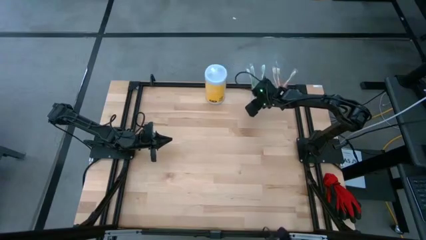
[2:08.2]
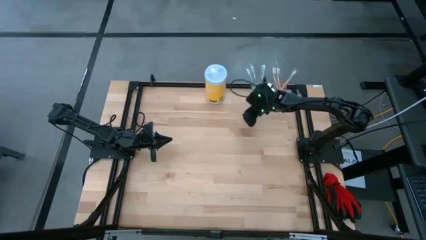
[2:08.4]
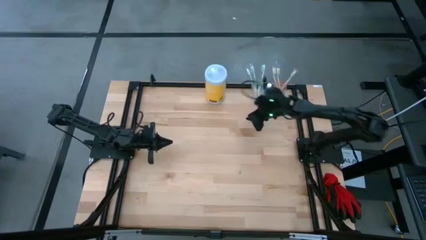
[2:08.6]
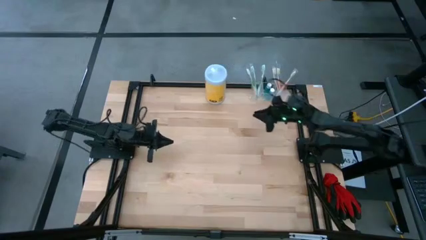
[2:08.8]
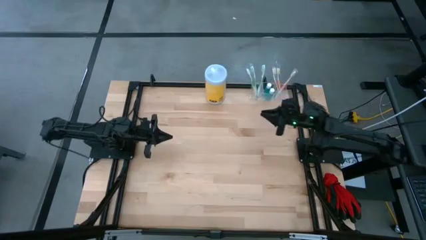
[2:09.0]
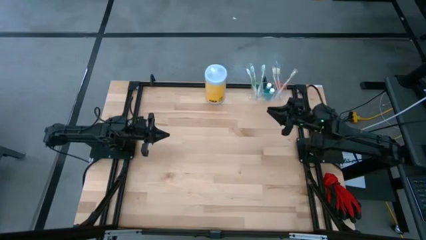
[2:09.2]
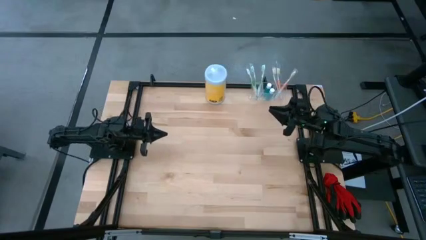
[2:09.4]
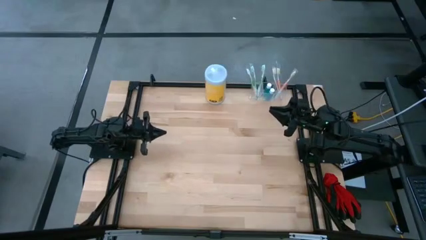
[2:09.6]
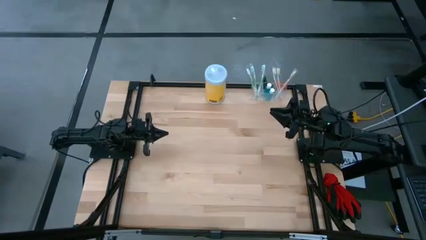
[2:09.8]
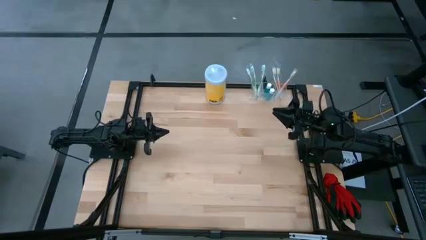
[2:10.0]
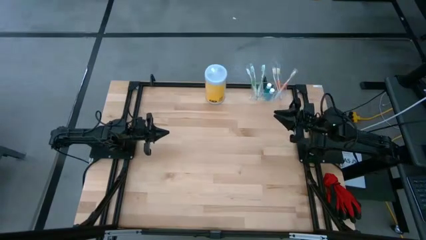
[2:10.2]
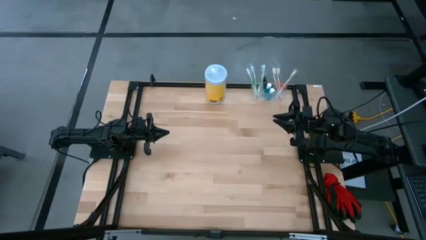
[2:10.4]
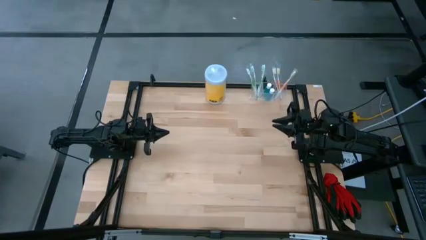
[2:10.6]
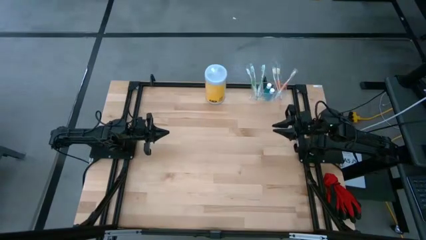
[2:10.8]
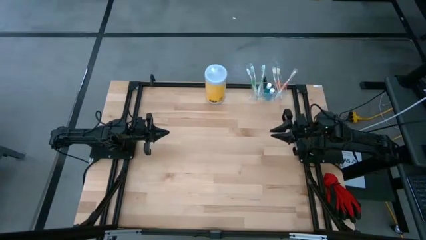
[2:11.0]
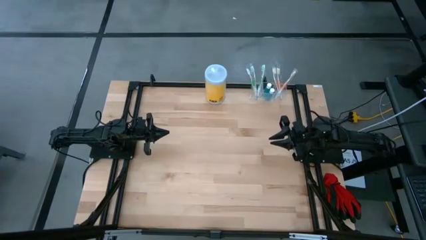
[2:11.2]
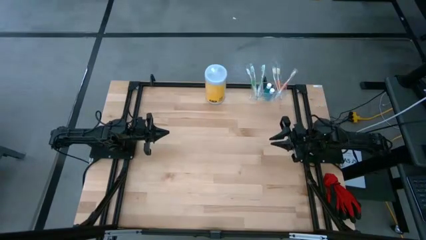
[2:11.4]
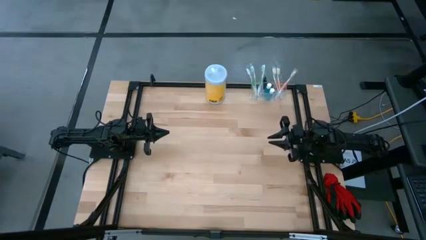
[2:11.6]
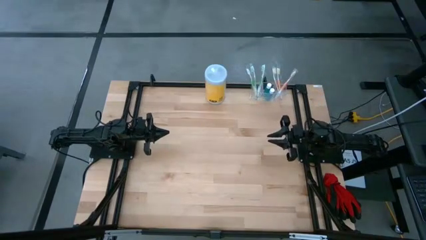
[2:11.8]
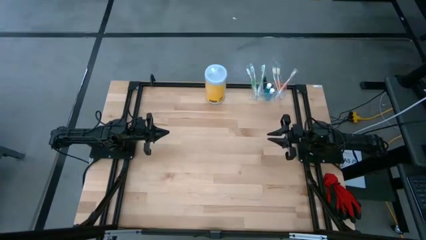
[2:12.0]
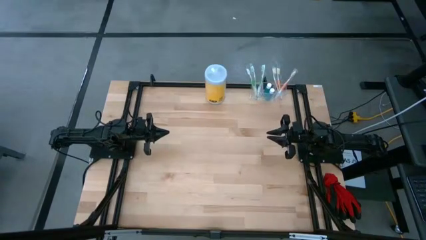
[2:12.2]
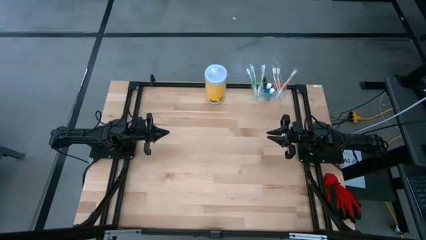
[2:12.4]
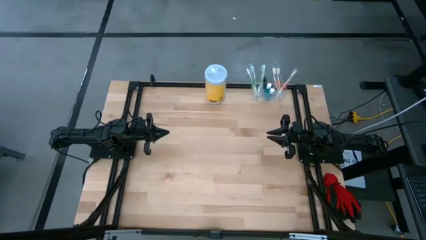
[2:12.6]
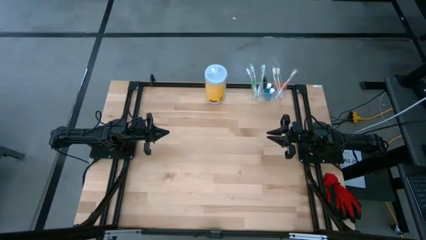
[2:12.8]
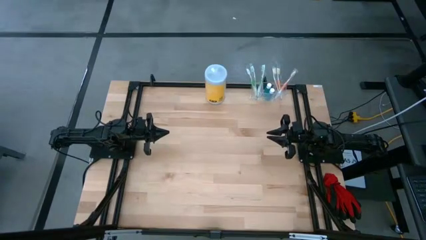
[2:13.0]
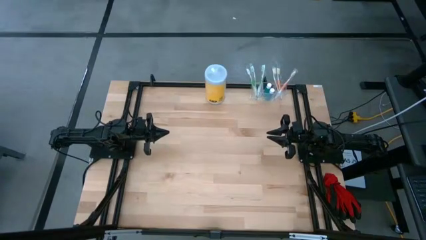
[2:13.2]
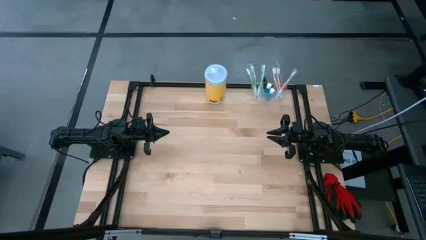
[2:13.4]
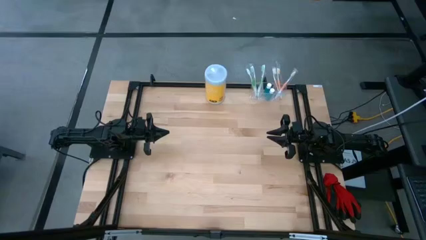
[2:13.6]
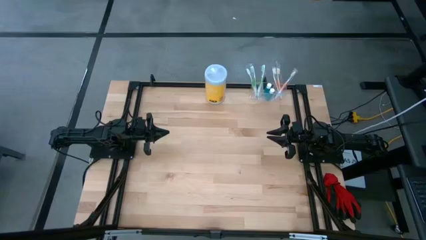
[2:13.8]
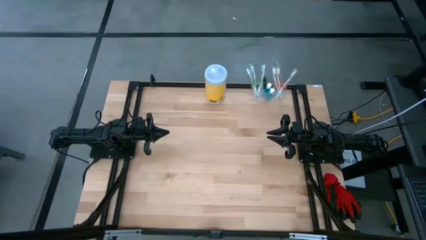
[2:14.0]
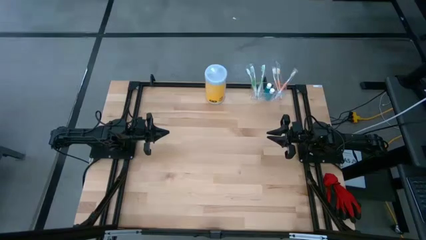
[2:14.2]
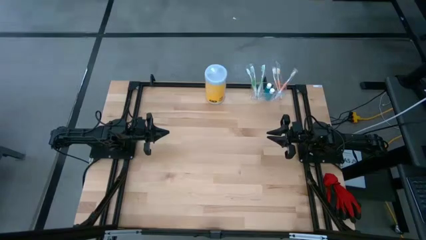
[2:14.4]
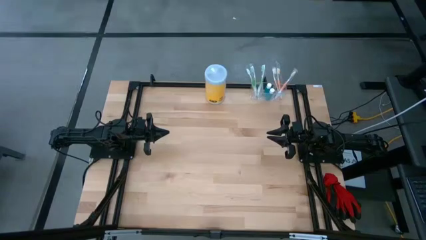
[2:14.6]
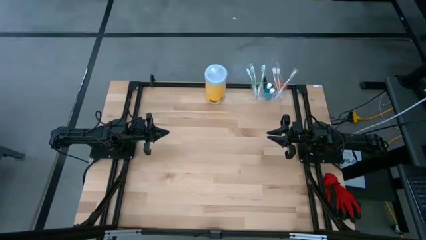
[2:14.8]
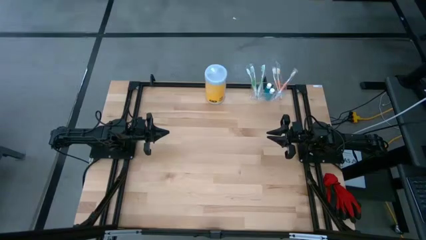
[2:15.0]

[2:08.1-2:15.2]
Task: Pick & Place toothbrushing station
Return to Home Position

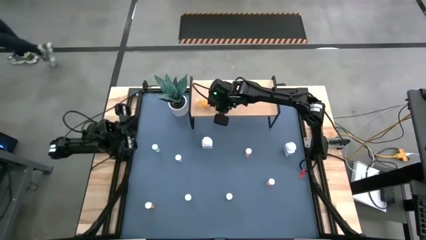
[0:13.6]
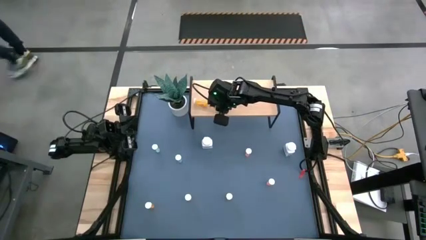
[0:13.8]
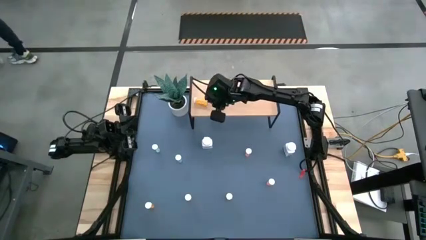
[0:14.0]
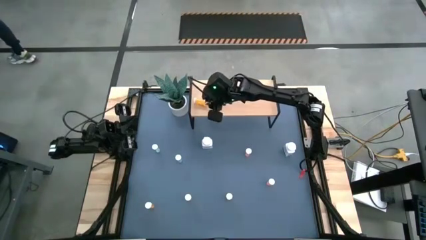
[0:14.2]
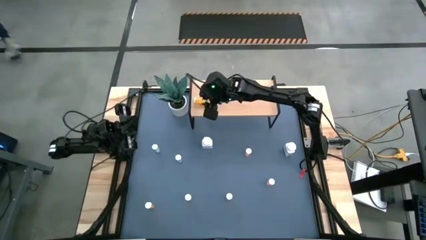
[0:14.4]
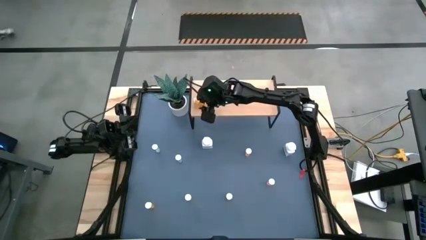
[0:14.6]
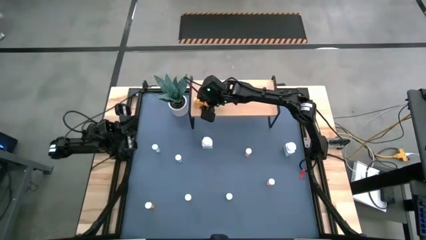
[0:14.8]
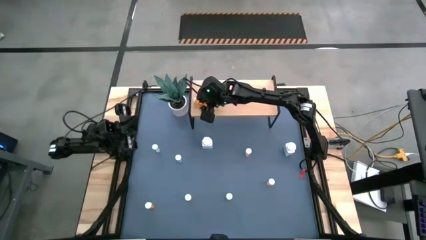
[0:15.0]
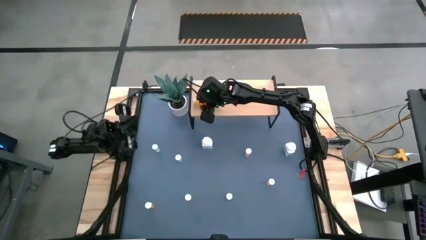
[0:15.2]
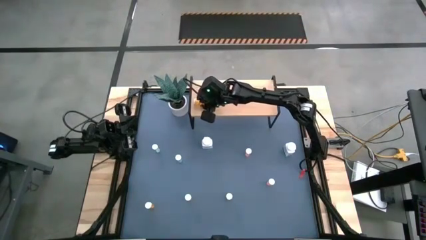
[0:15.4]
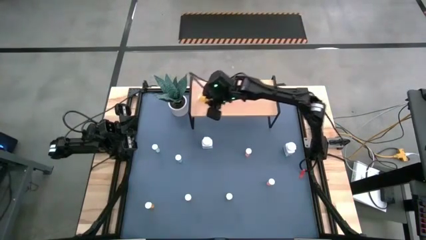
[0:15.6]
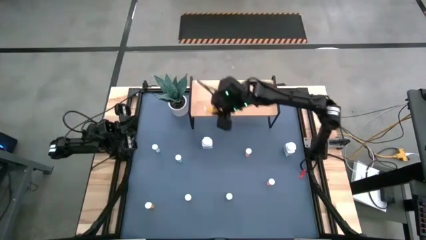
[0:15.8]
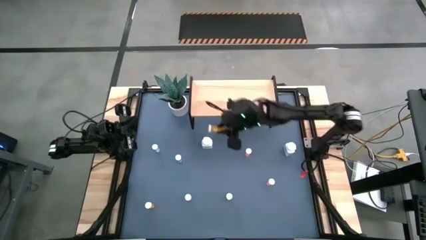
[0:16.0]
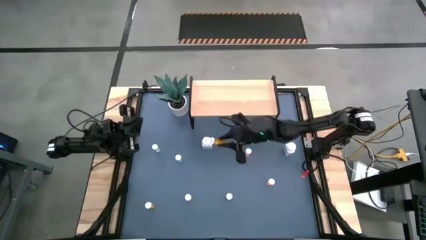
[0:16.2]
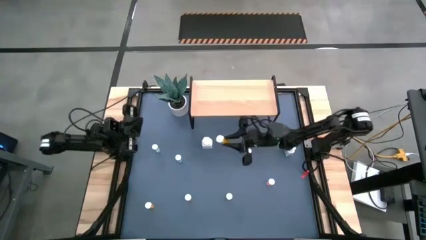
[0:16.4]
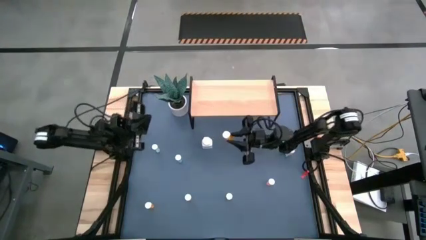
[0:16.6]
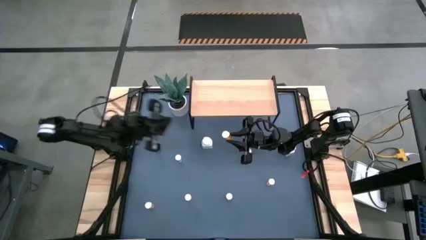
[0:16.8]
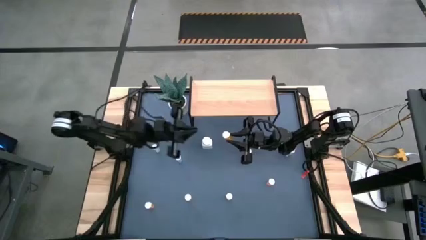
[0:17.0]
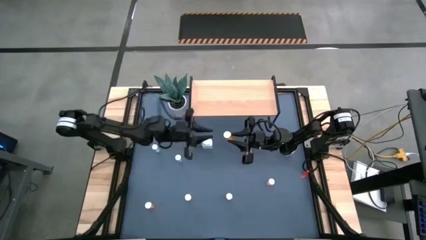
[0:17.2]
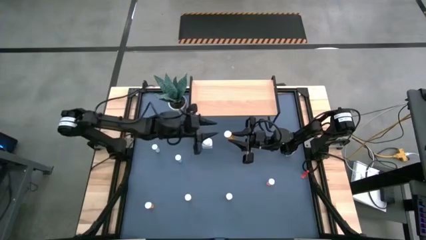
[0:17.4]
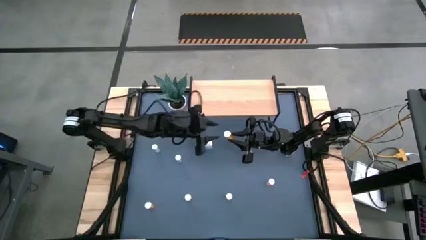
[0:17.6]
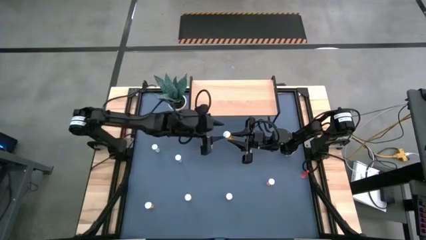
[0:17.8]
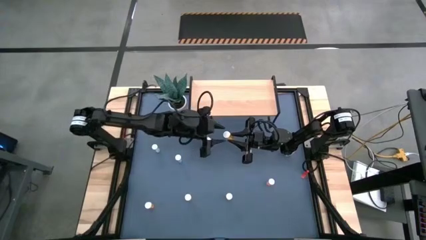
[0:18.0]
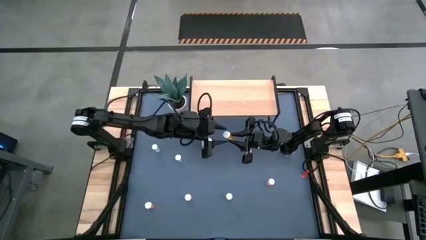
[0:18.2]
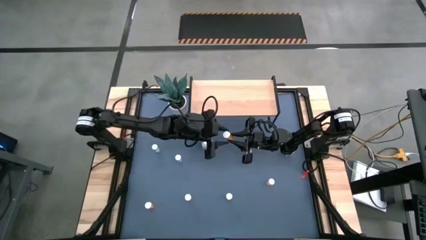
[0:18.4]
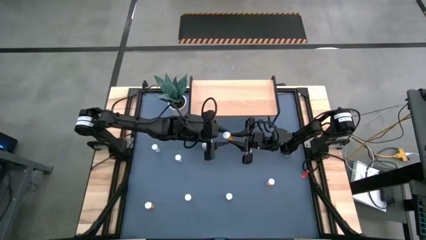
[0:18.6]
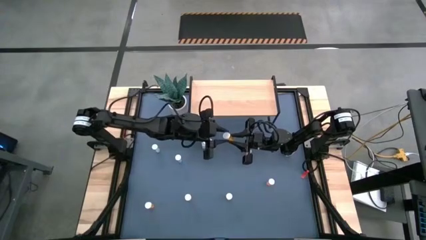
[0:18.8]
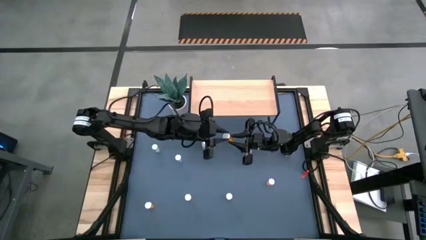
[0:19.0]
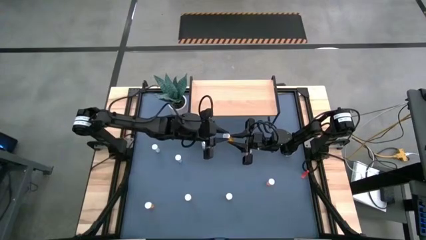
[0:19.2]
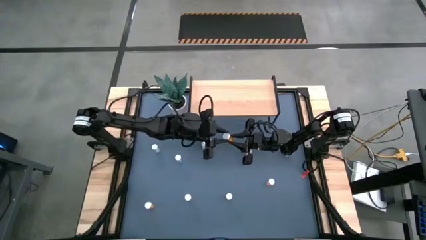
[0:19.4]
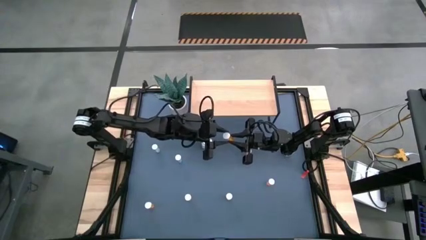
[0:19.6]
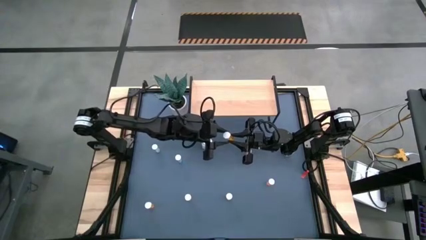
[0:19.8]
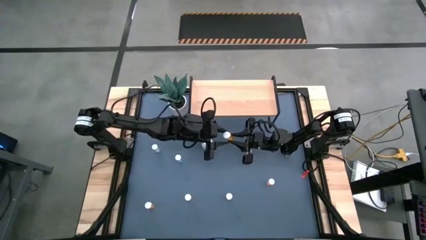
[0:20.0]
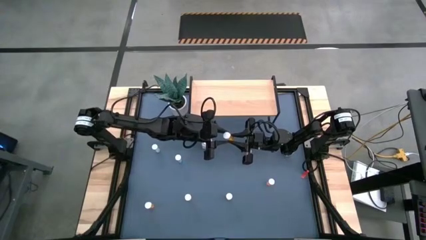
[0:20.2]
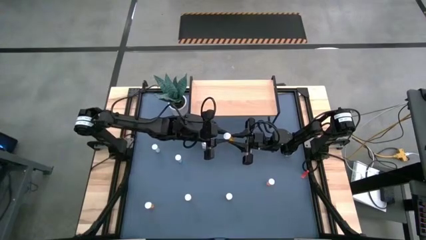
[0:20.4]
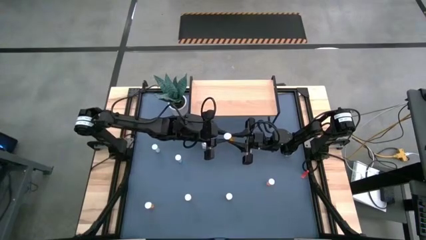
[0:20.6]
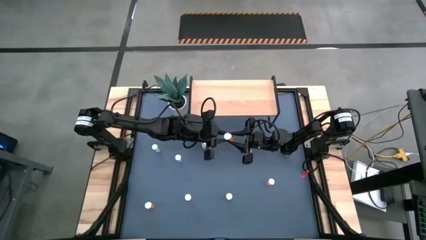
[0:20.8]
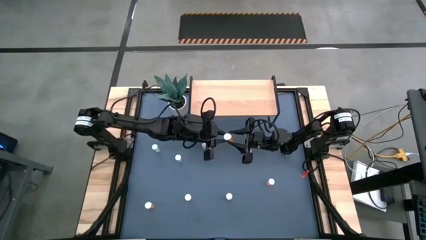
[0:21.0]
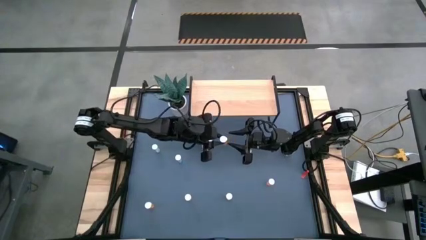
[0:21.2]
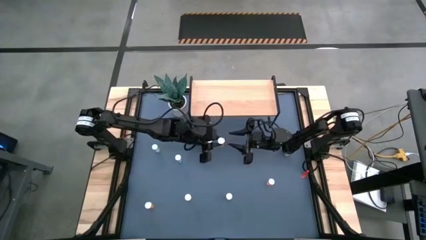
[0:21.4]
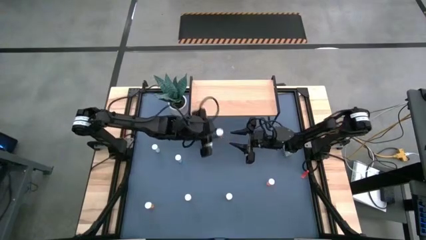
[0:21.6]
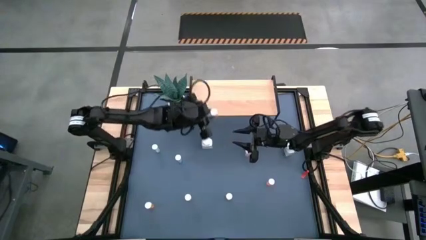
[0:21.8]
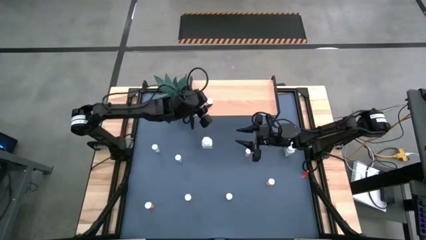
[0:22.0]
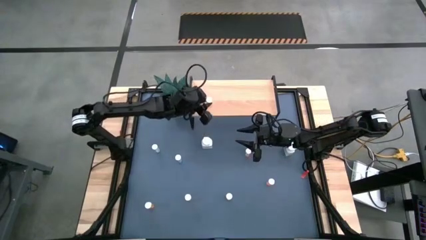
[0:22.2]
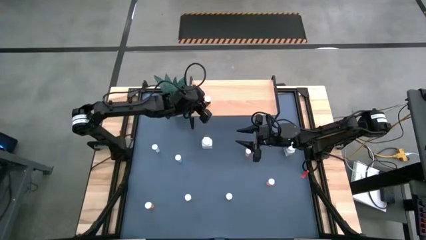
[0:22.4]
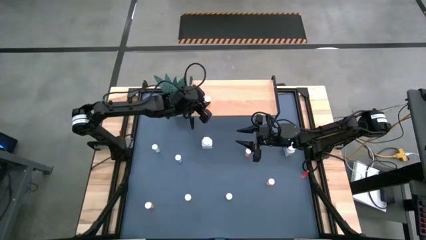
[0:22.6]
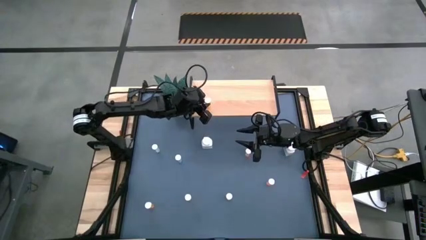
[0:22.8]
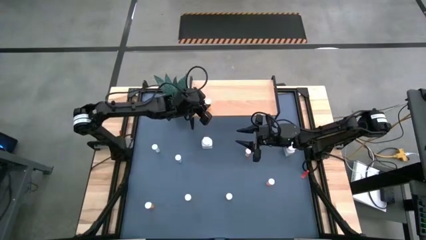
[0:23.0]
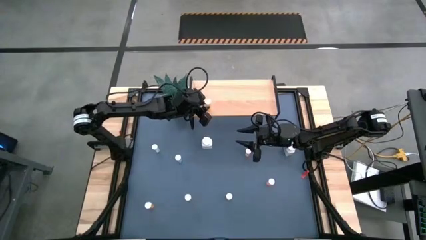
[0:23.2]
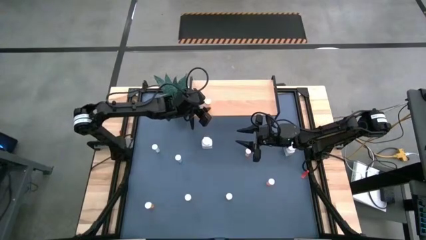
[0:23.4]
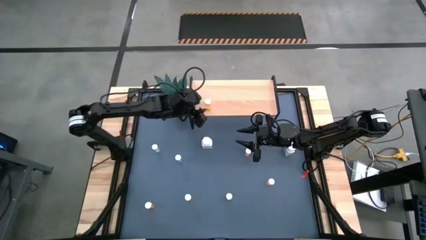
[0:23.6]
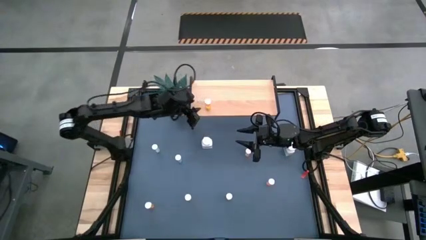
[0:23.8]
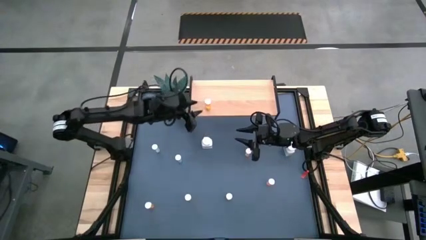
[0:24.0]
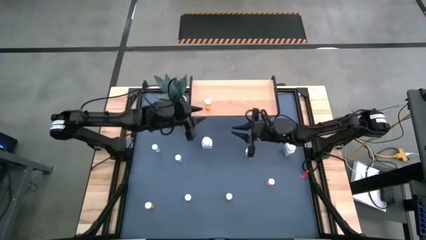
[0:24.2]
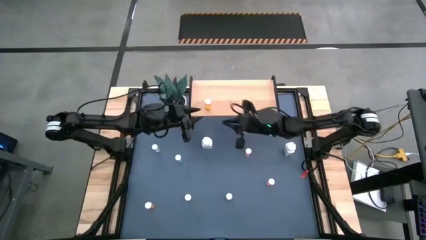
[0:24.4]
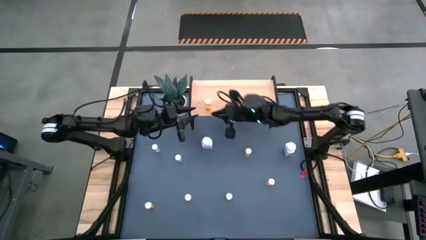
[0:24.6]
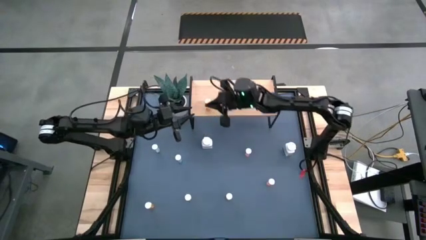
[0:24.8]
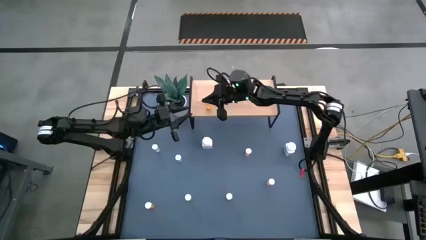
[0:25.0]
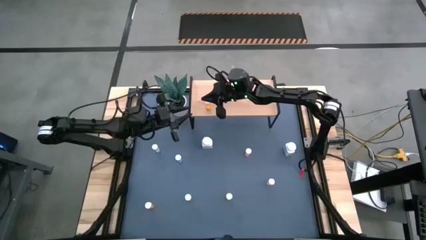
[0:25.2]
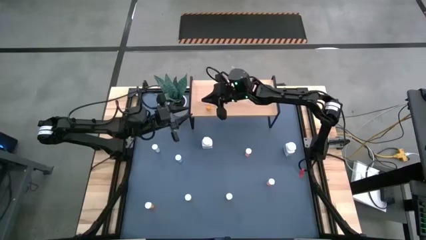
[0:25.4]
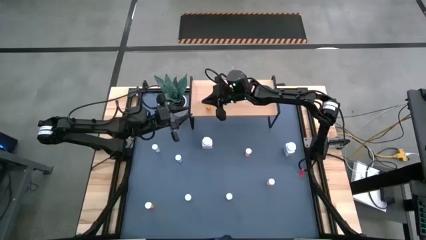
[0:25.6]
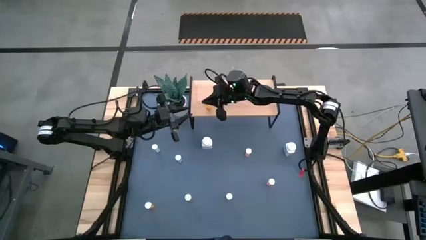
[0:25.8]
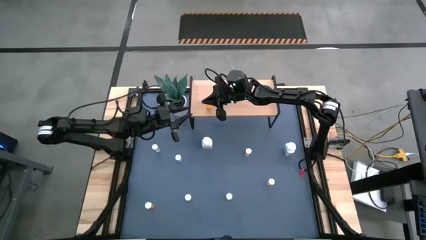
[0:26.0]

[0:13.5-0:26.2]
Task: Pick and place medicine bottles onto shelf by color
Put the right orange medicine bottle on the shelf
